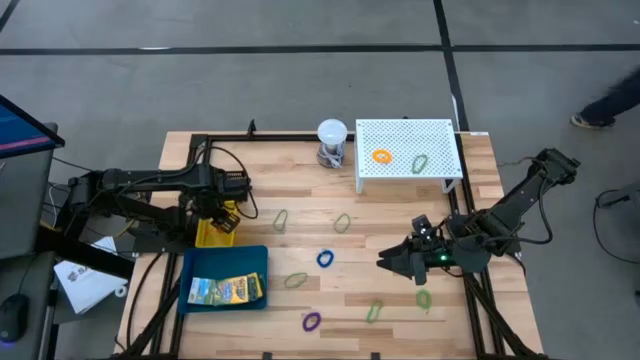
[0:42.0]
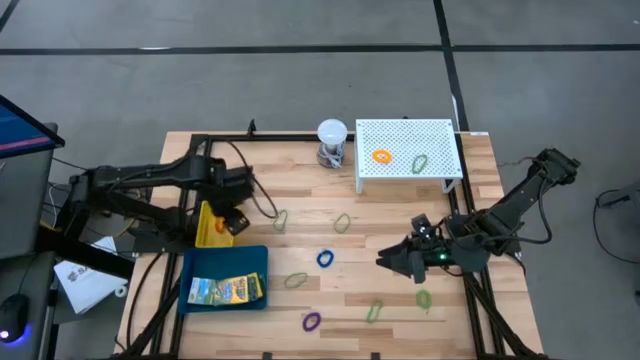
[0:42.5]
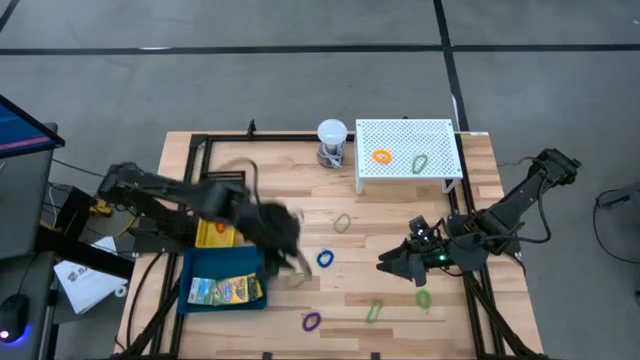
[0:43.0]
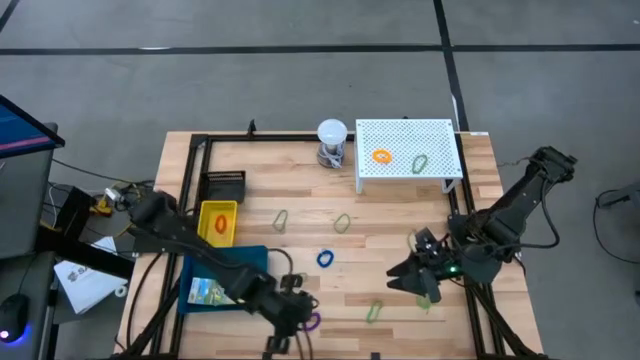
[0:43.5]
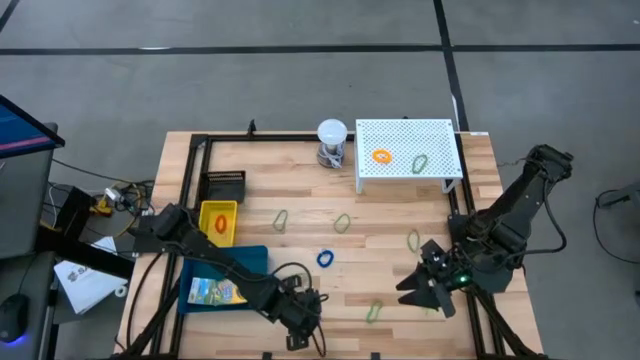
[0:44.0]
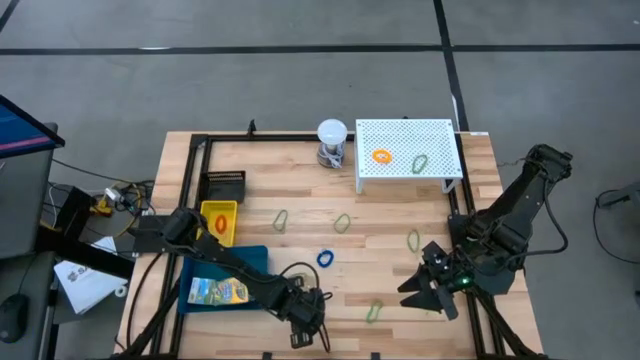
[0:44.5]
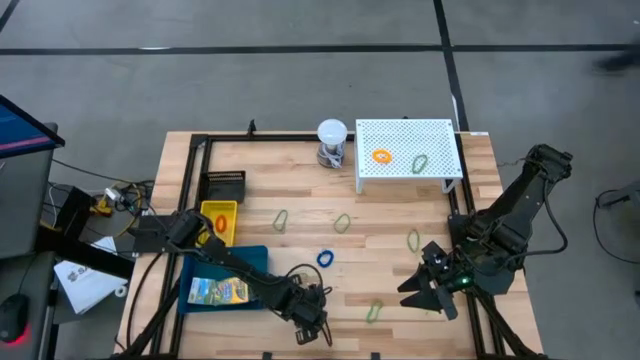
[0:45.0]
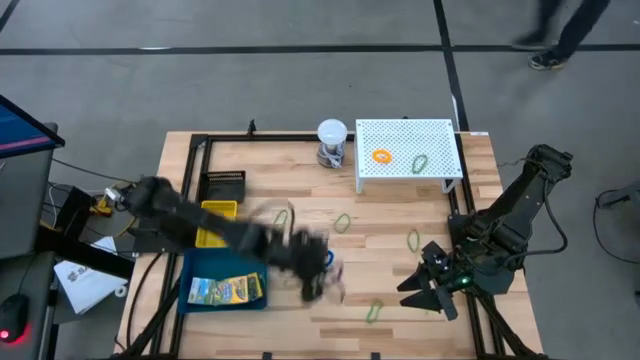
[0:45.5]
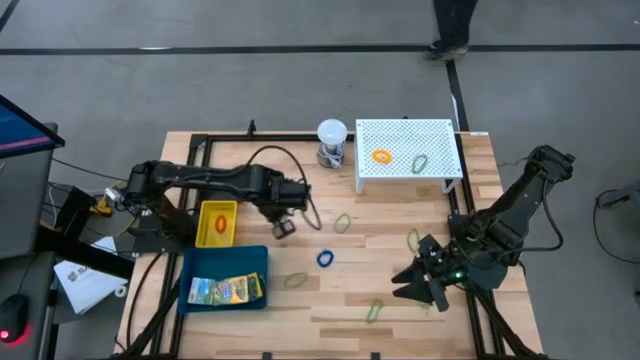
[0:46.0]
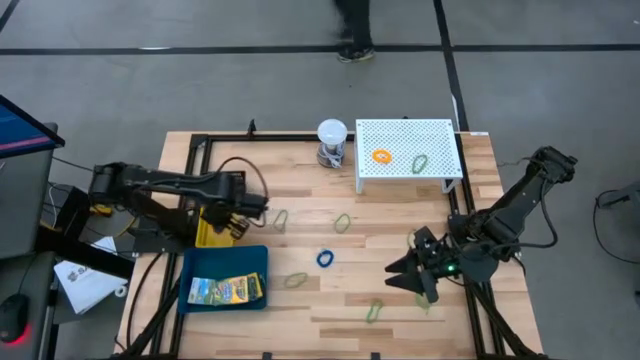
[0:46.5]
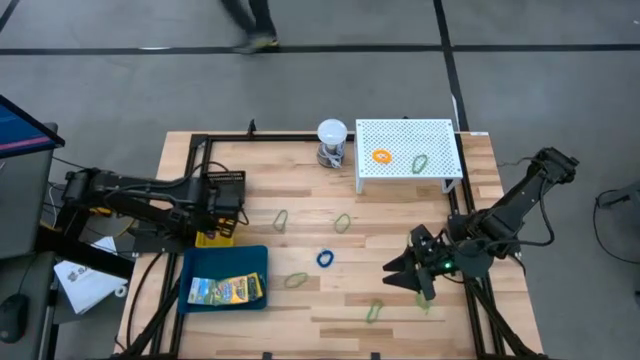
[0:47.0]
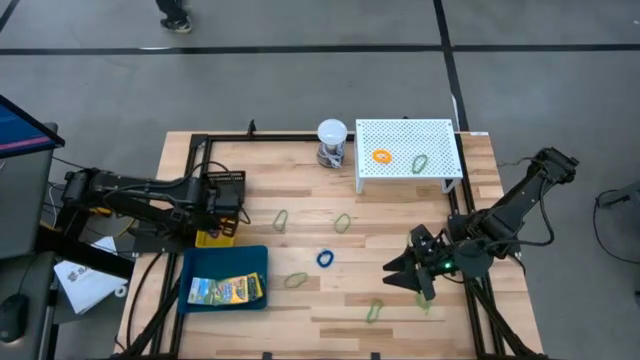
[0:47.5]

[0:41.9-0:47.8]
Task: Pick & Place Office Desk Supplies
Put the purple spring keychain into the yellow bin

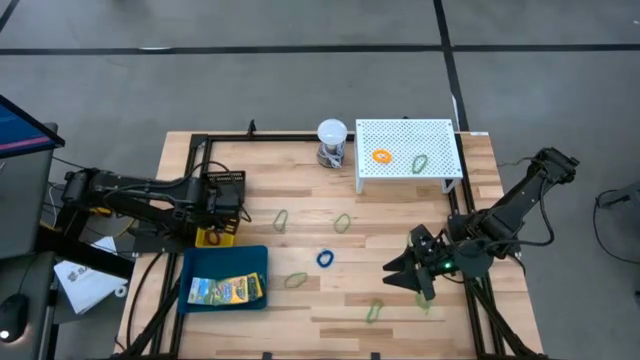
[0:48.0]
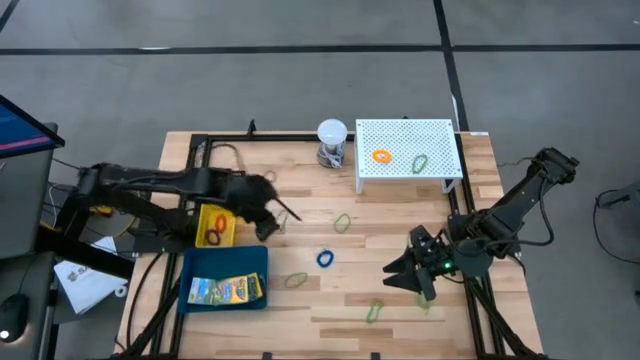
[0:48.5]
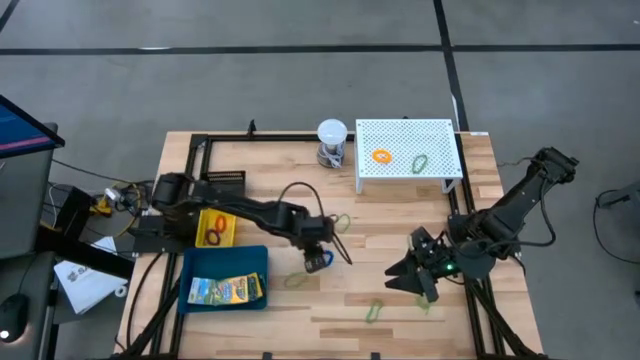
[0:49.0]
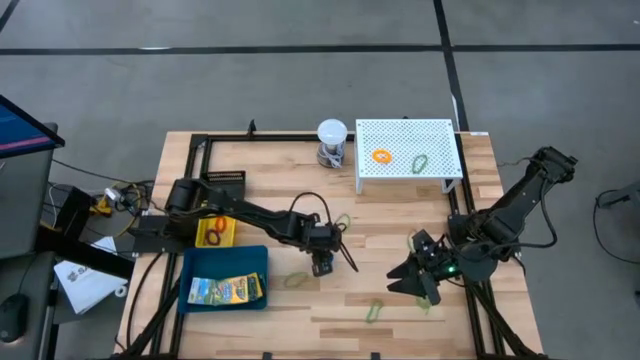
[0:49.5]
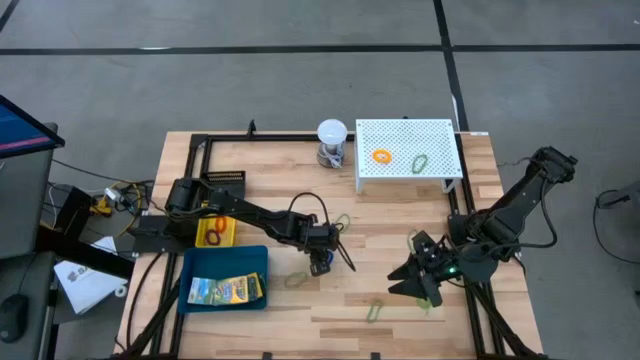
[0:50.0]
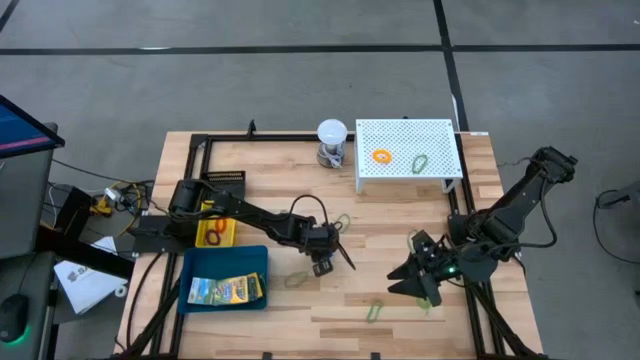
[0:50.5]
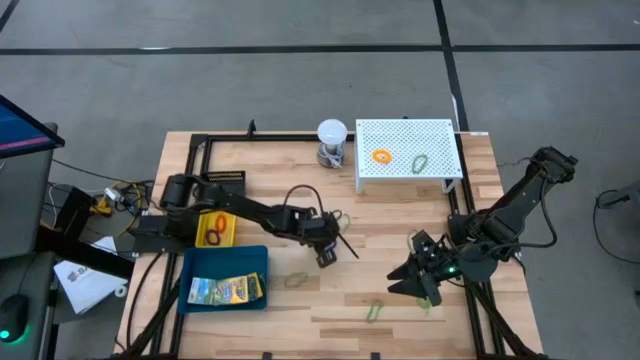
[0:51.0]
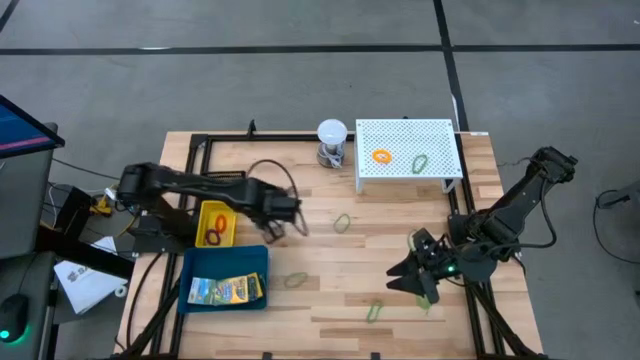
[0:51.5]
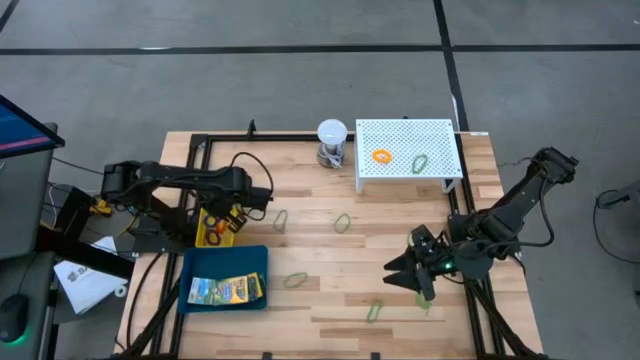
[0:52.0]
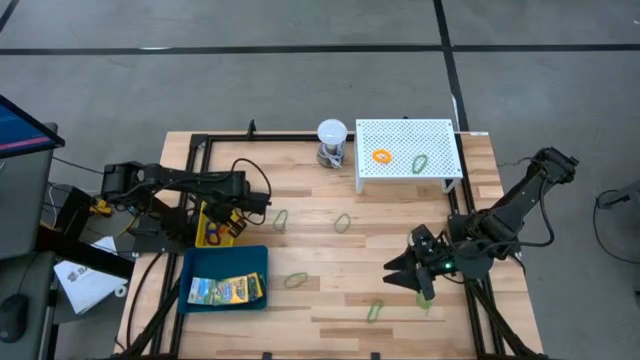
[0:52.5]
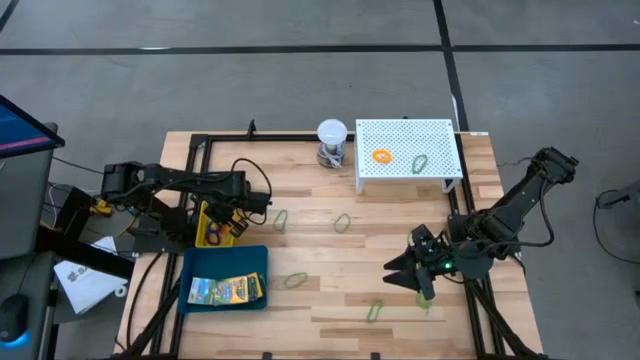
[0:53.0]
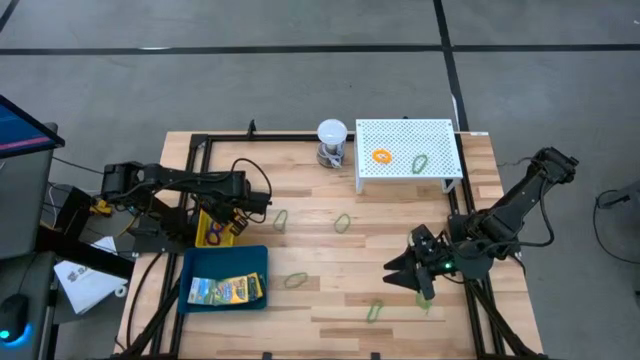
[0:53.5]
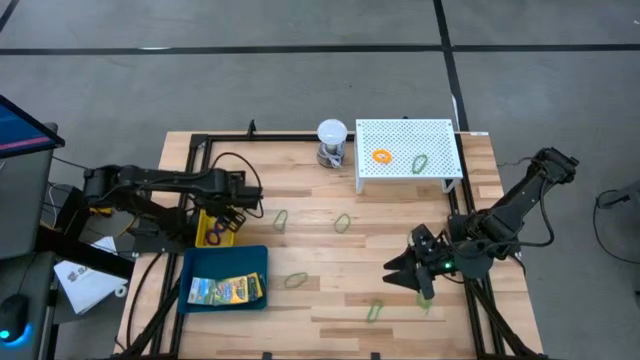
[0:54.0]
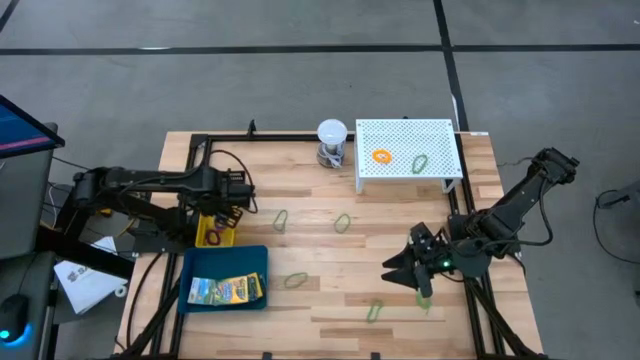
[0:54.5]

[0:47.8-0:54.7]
Put the top blue spring keychain into the yellow bin

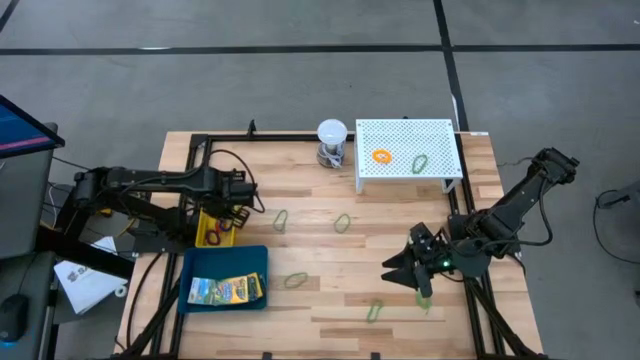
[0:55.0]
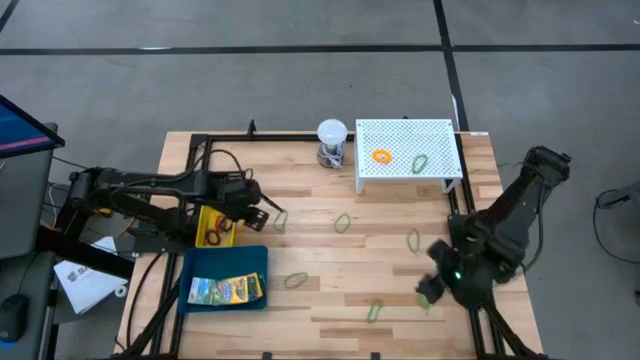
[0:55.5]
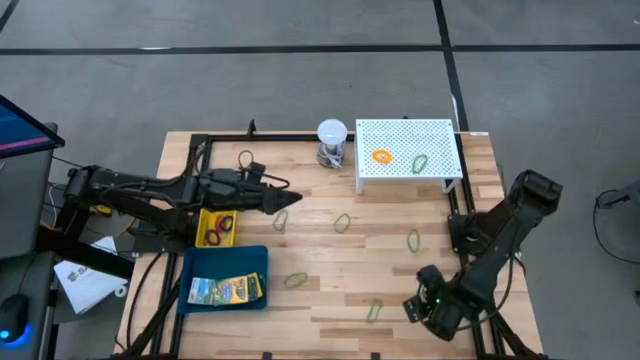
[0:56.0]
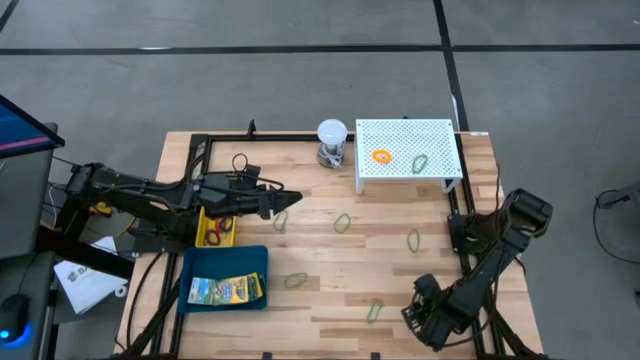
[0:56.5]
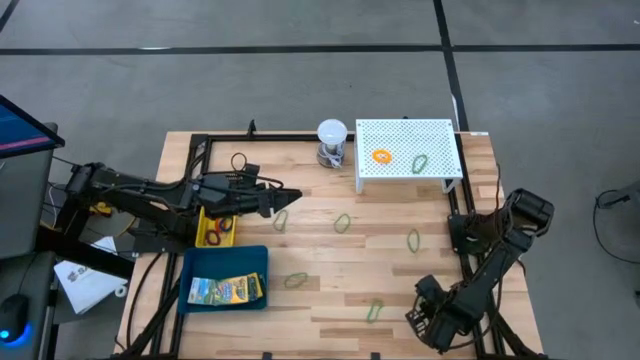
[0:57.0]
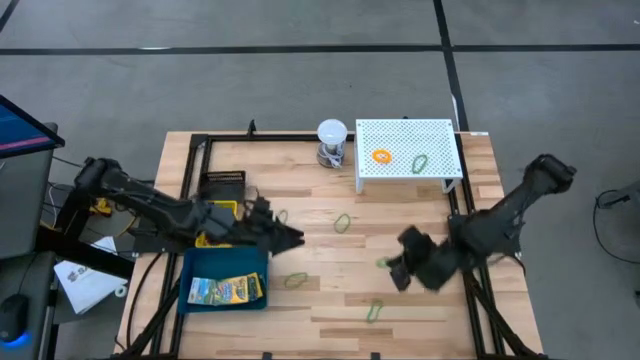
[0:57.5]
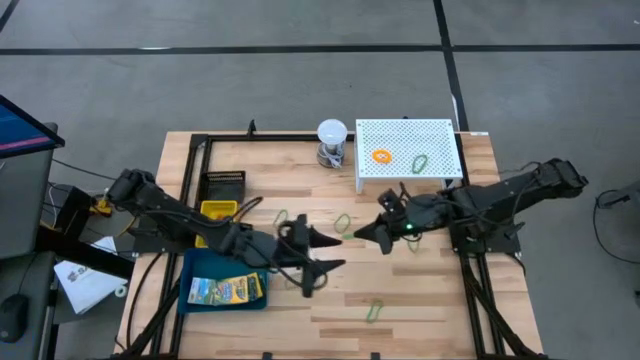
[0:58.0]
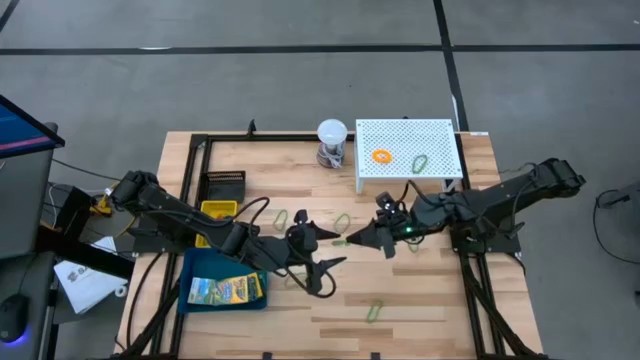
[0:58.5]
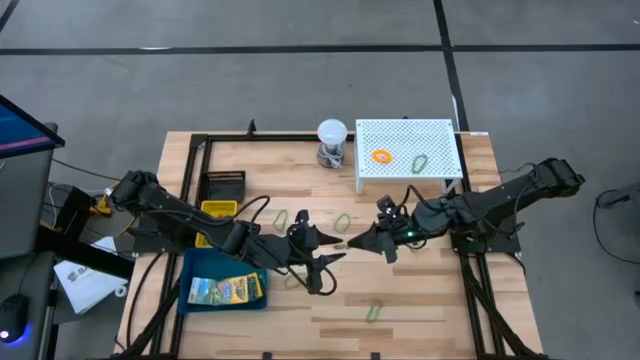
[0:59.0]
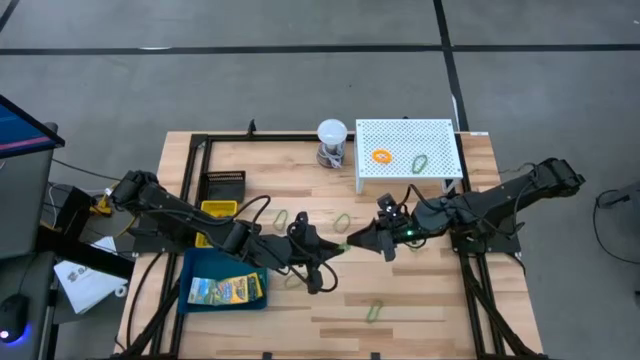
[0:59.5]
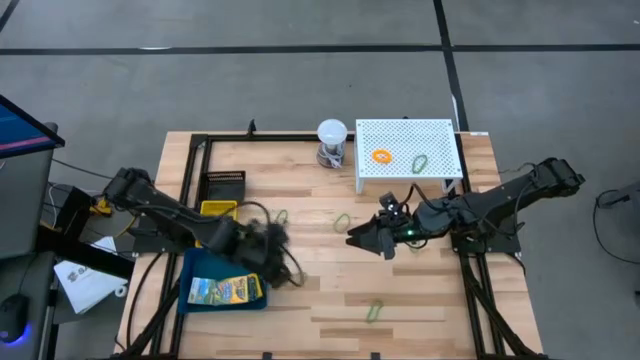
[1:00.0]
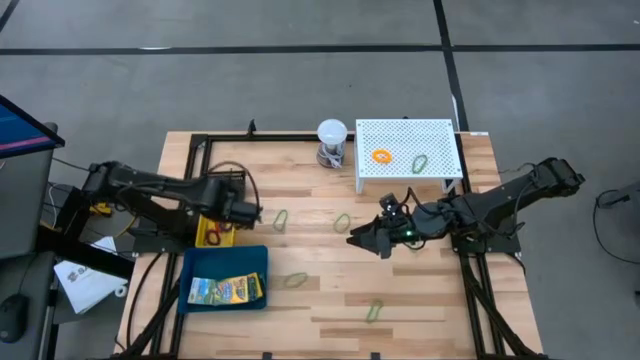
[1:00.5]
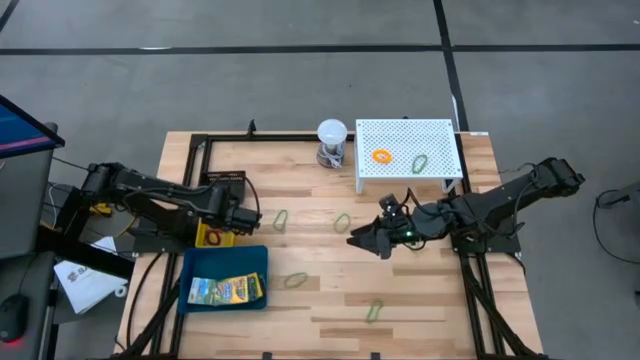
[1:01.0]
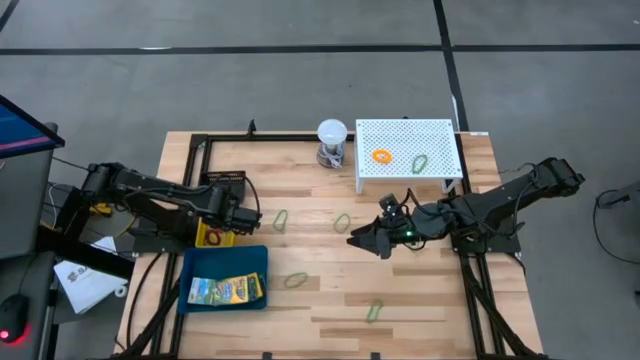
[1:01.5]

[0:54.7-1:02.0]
Put the bottom green spring keychain into the yellow bin

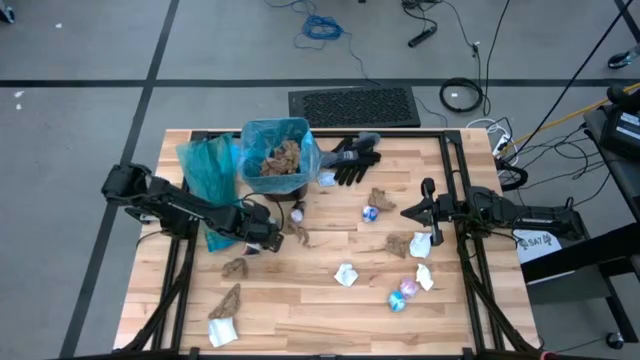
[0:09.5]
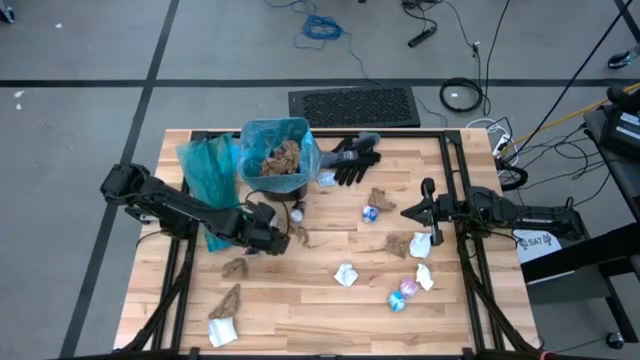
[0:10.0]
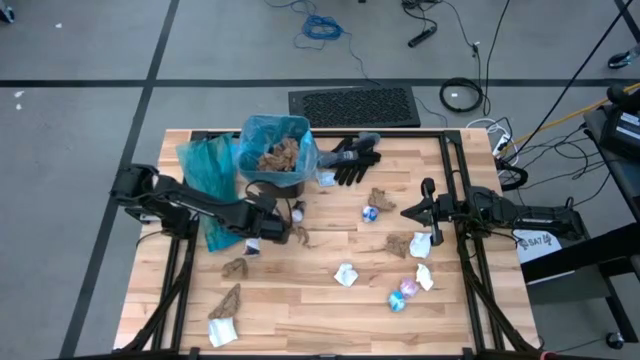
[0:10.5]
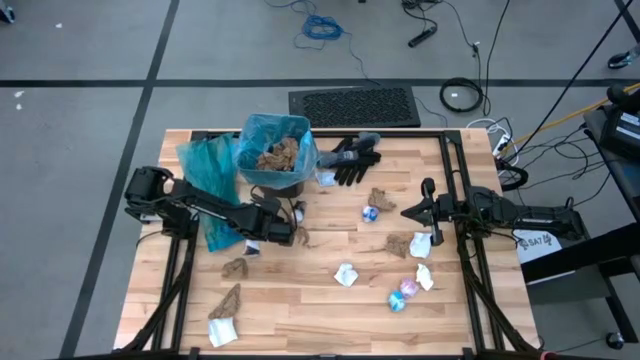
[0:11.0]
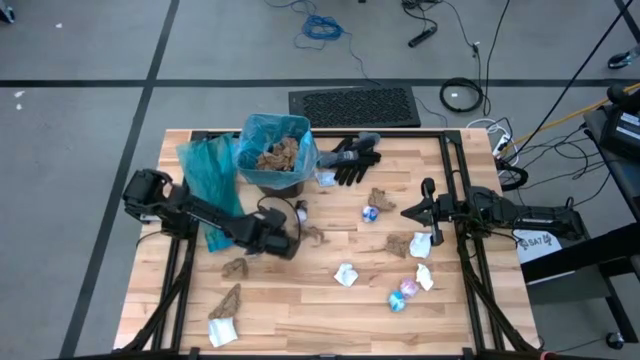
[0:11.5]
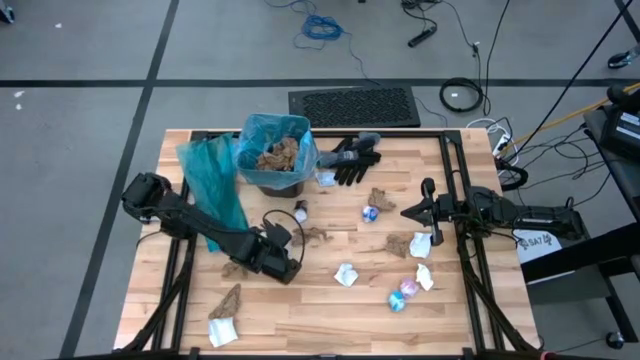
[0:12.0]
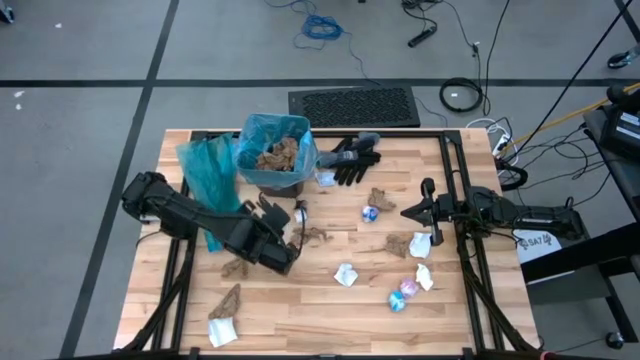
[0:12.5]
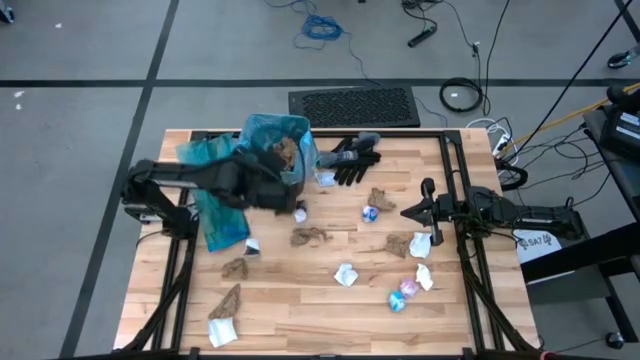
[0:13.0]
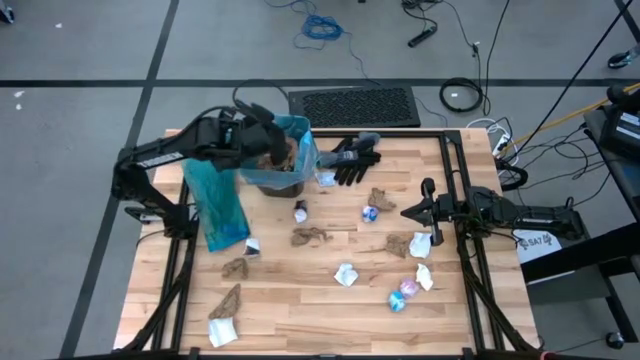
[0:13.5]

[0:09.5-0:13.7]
Task: place trash/remove bag and relplace
Put the white napkin into the trash bin
